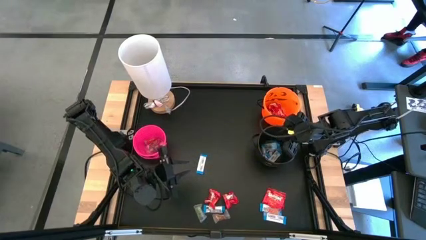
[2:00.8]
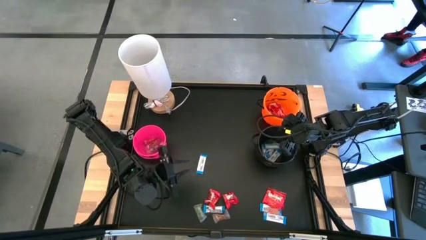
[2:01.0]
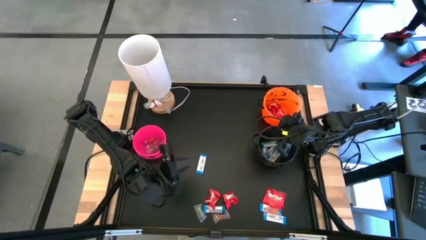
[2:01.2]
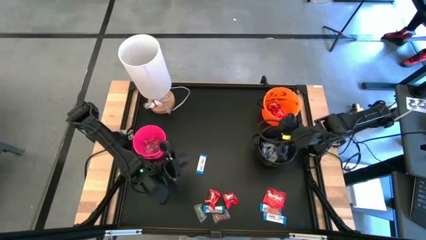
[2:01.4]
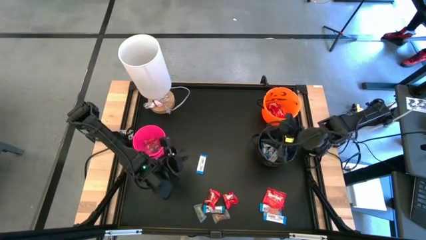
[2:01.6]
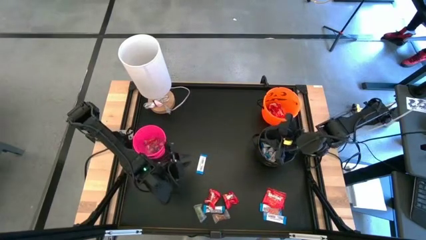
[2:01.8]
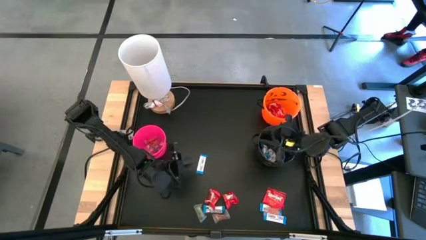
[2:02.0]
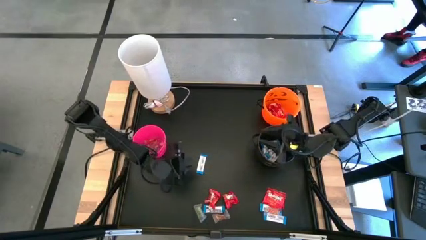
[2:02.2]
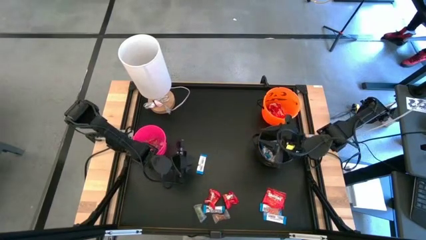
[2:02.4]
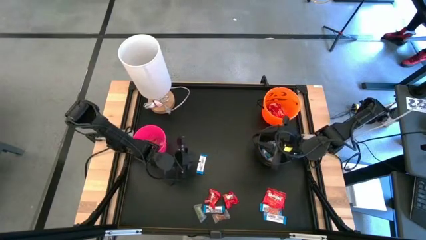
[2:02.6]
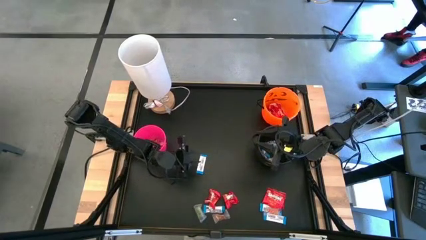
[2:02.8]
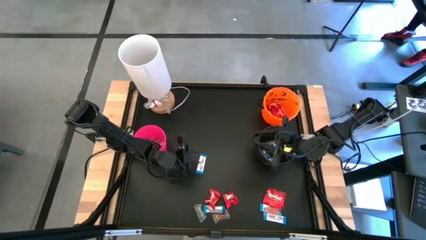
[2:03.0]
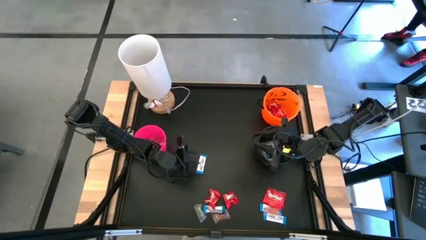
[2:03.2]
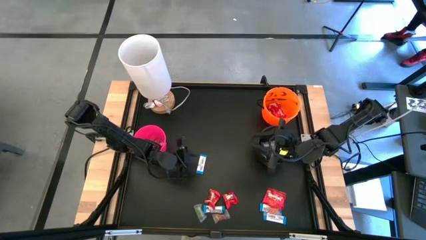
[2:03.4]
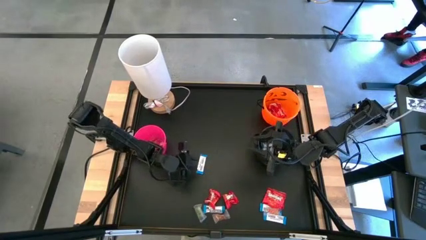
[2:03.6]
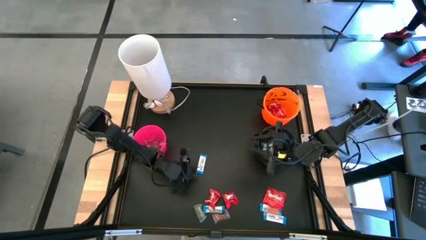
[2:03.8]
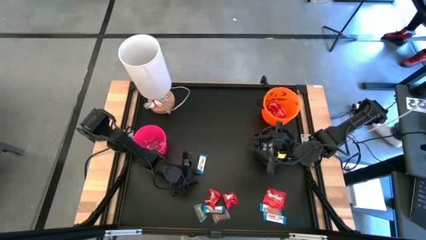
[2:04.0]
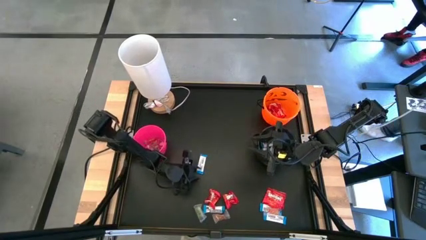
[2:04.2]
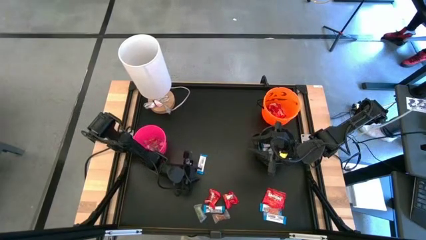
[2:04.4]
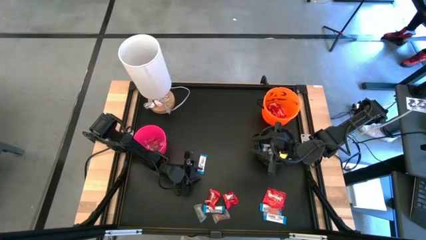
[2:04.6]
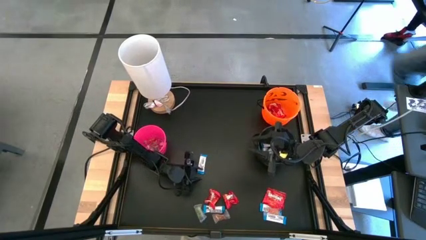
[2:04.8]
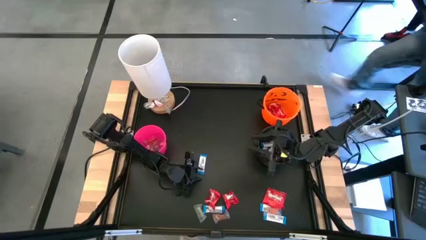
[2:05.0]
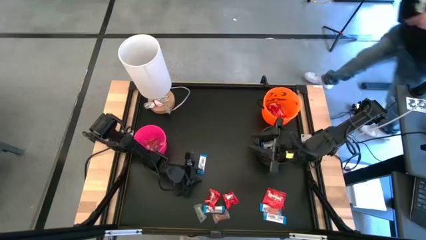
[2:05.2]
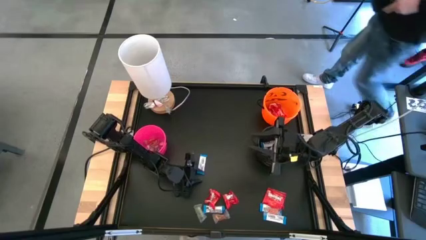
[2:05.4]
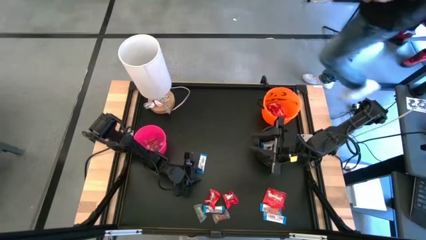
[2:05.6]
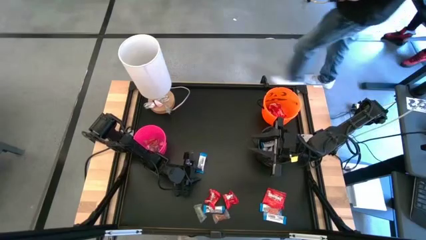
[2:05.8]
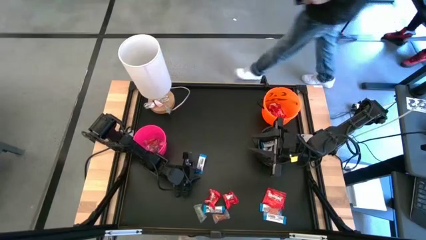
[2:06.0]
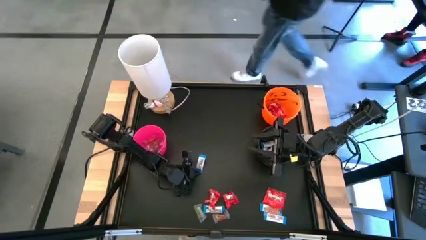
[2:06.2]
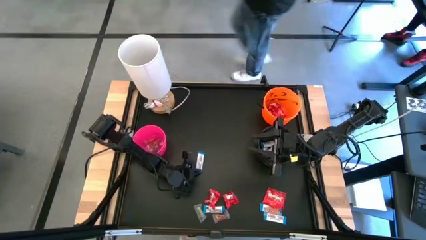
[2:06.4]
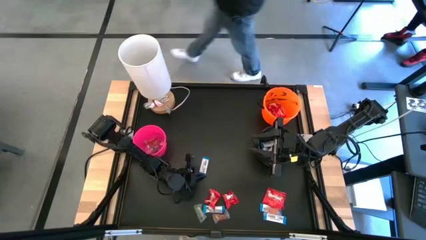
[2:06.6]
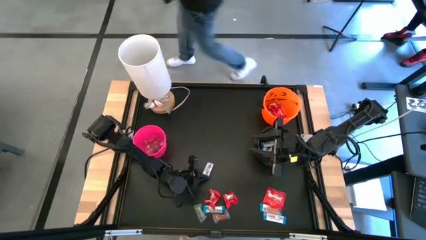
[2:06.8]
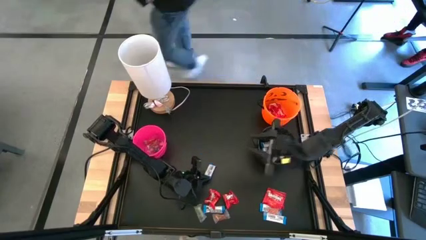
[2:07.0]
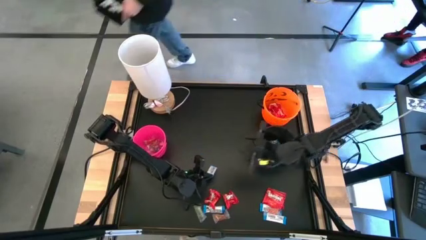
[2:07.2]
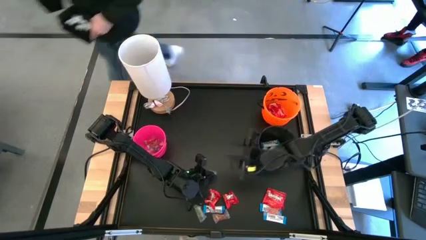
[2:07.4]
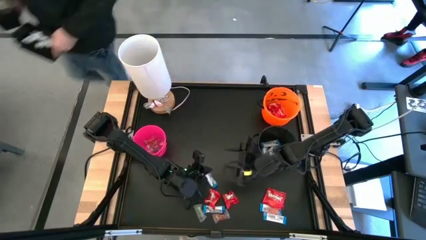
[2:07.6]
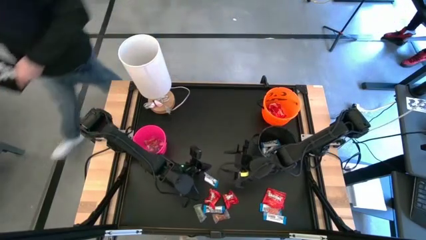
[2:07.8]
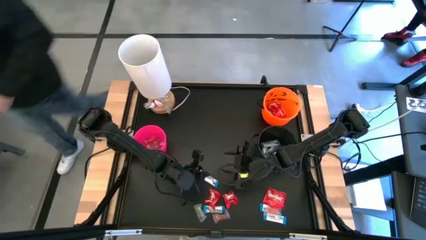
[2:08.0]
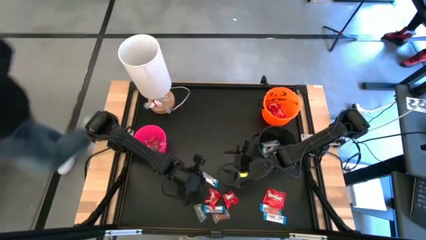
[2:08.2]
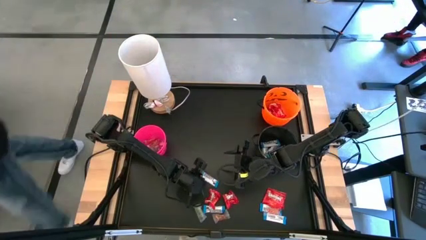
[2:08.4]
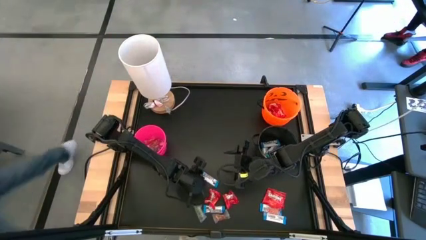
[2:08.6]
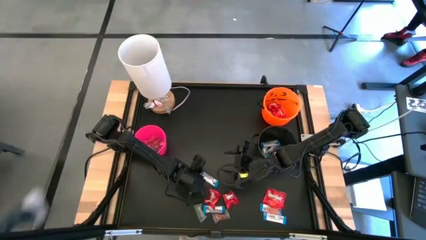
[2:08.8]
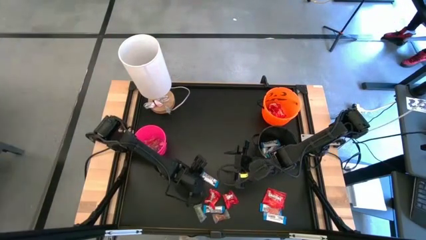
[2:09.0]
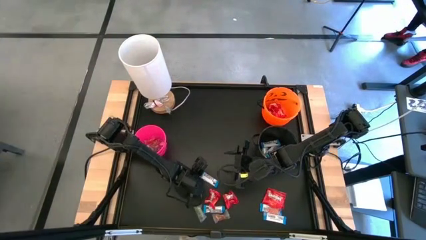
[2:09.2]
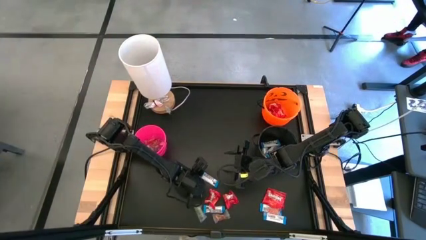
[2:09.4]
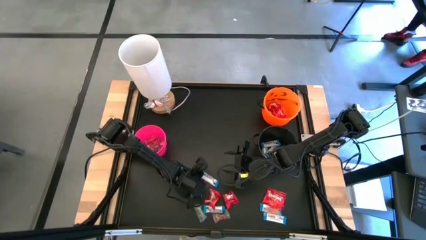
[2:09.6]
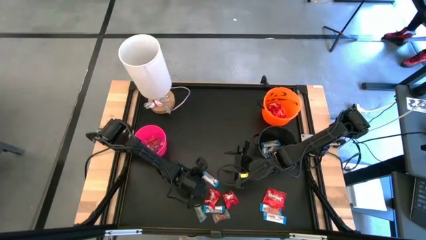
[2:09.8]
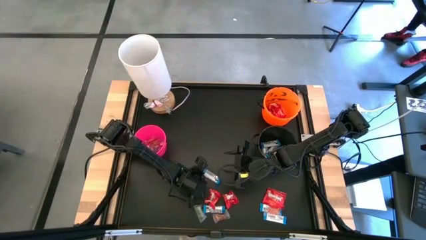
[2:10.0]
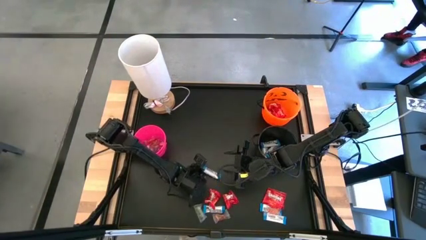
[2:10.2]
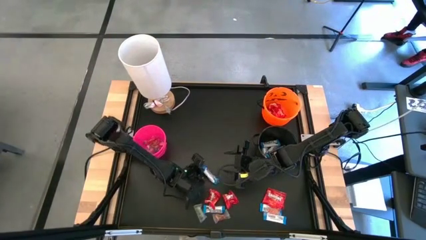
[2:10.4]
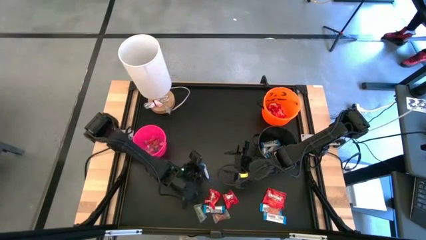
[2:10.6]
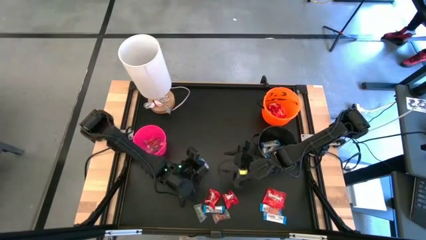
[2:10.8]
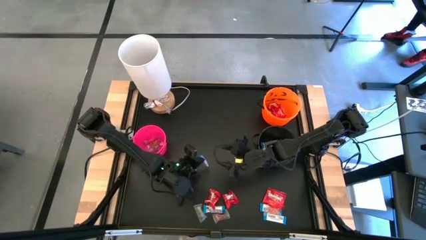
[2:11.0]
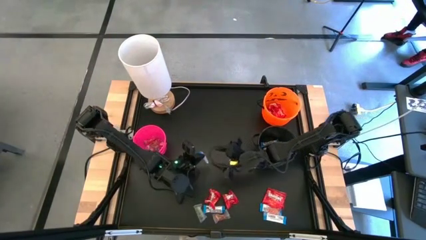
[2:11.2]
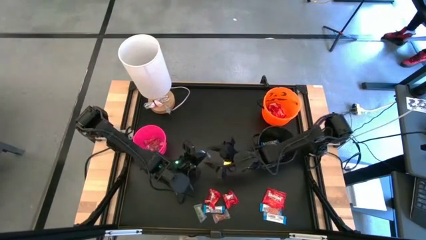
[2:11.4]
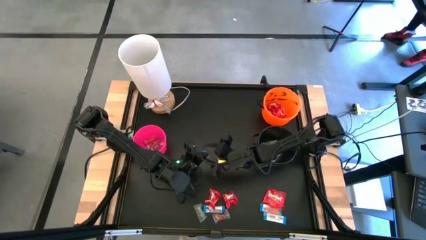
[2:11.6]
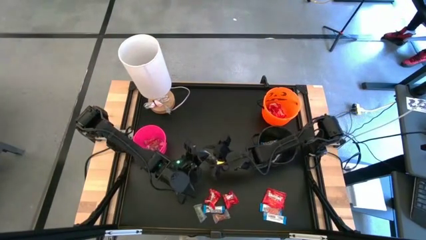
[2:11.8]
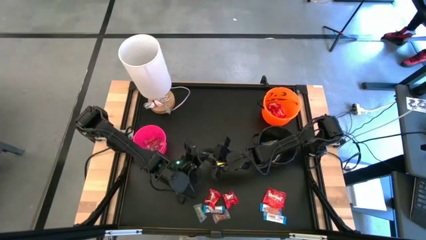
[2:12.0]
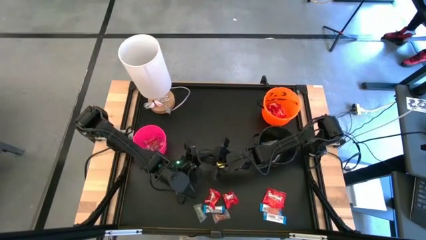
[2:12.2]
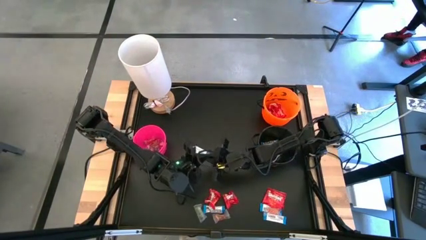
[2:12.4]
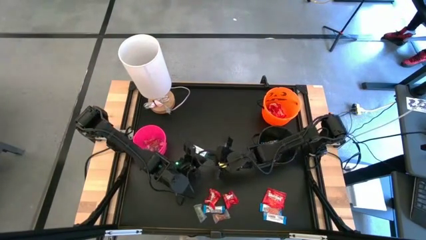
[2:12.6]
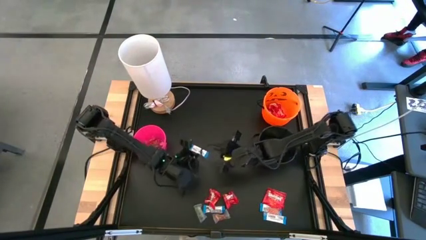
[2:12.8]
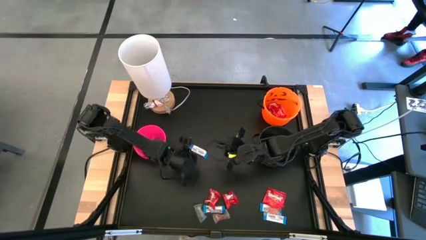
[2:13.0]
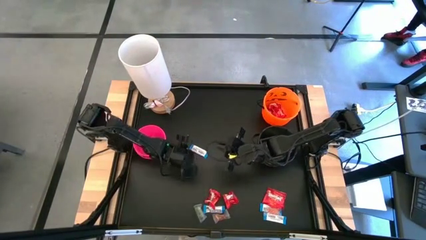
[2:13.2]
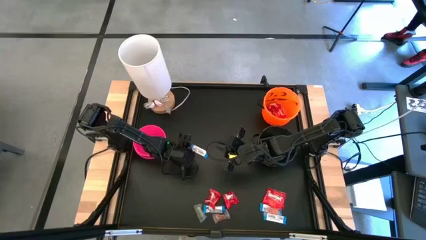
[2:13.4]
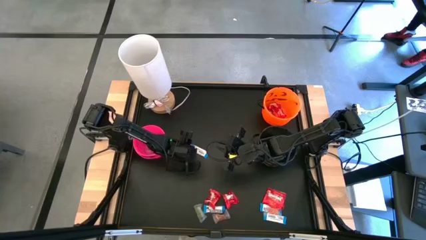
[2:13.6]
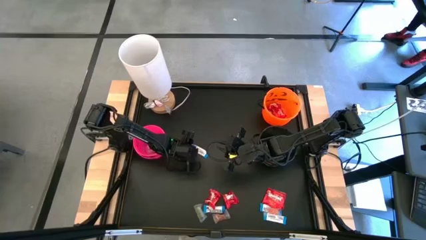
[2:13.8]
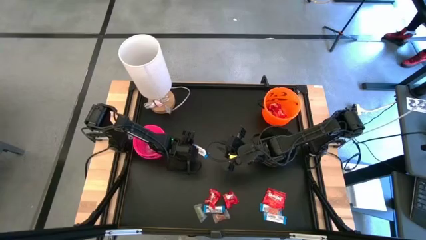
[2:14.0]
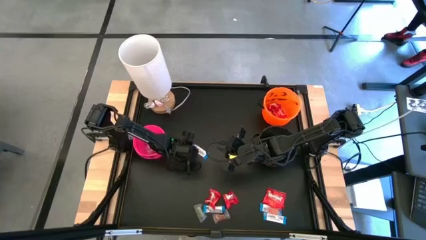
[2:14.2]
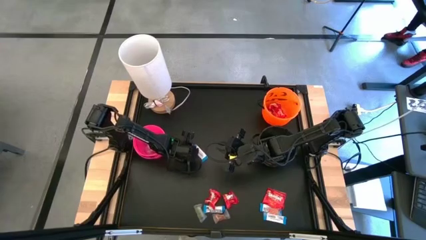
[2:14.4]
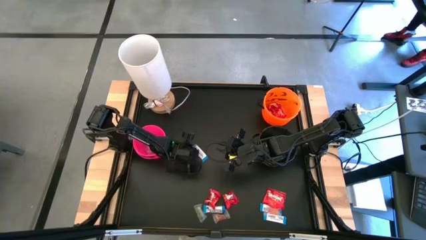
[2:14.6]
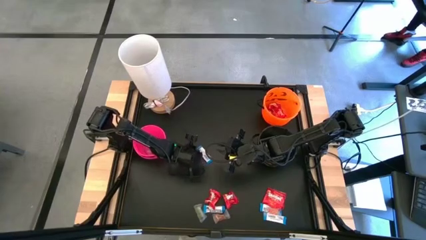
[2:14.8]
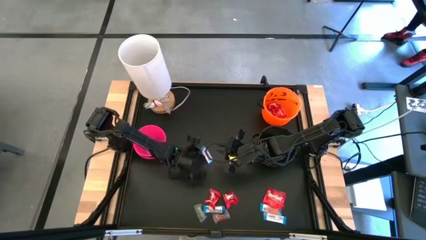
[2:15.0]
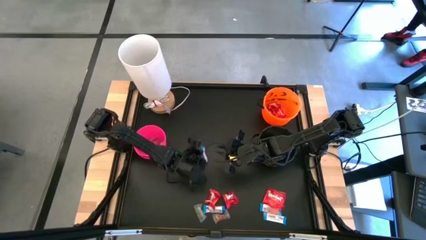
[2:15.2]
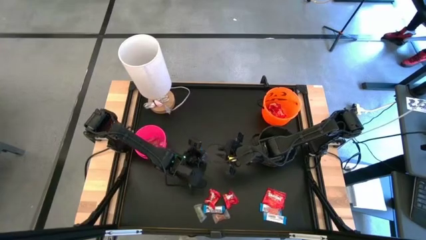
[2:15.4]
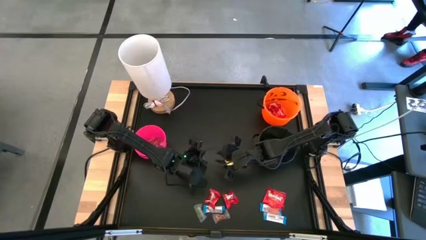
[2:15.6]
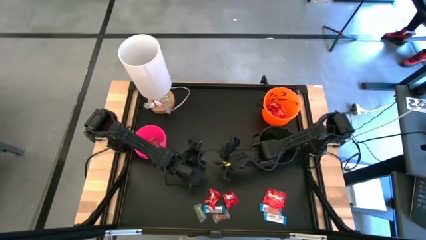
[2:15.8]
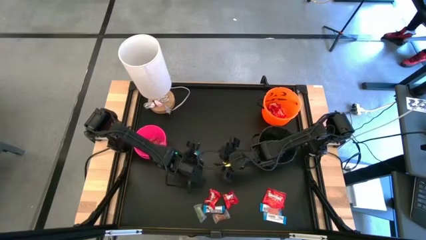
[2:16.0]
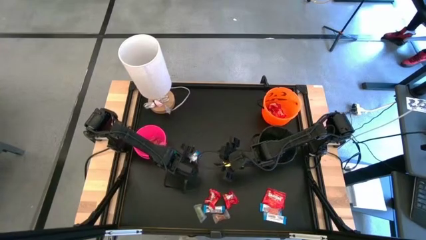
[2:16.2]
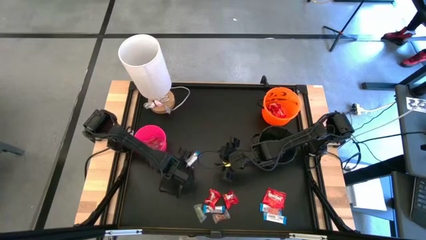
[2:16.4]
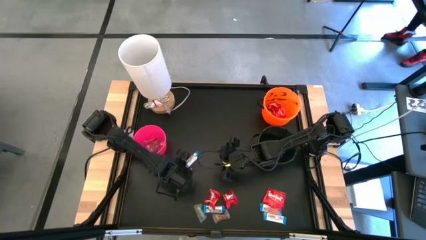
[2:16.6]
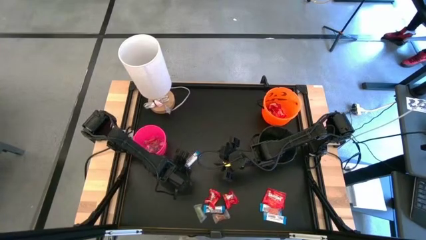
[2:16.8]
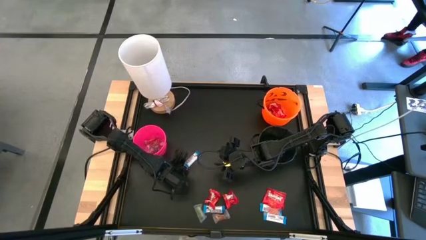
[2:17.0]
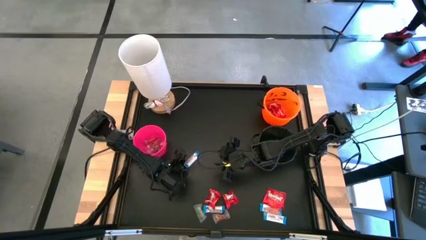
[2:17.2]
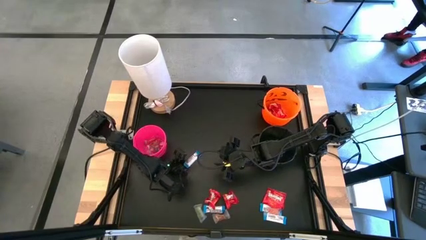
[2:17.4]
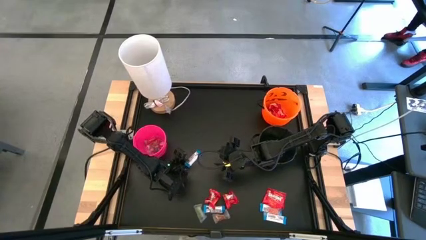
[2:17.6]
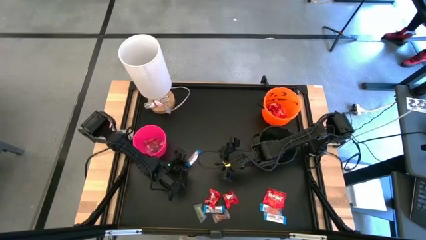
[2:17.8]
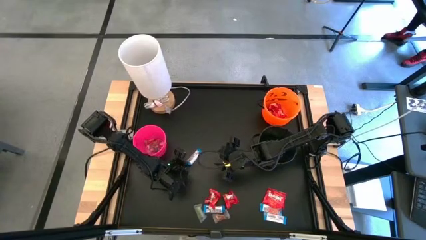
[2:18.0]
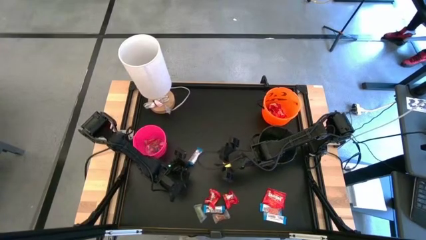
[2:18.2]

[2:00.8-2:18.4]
Task: Sort candy
Put the white chocolate into the black bucket

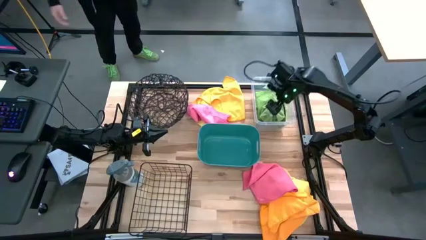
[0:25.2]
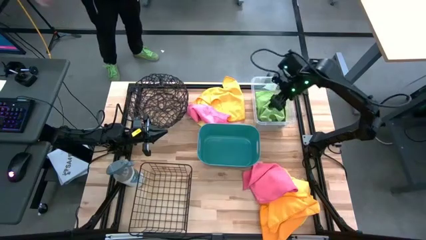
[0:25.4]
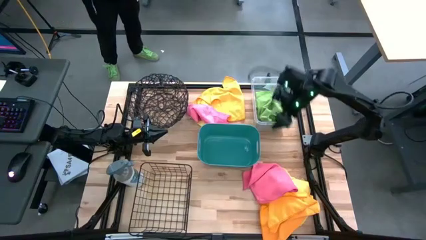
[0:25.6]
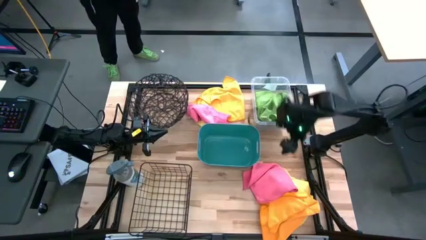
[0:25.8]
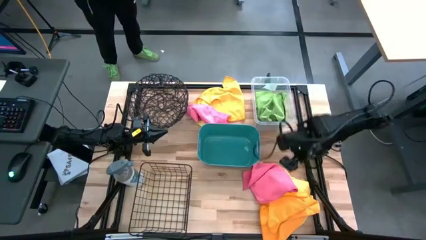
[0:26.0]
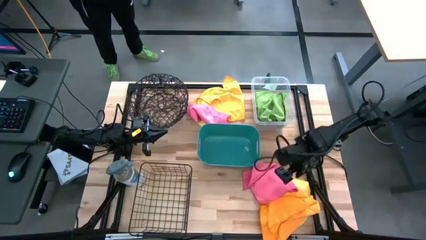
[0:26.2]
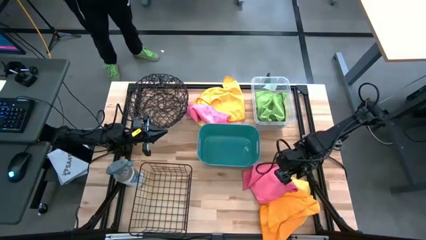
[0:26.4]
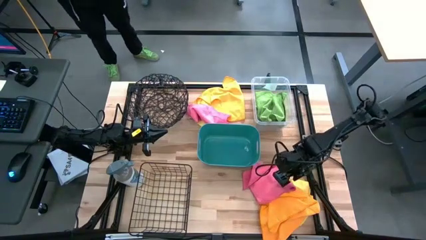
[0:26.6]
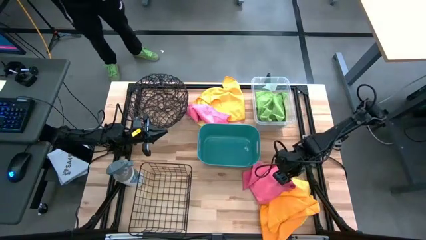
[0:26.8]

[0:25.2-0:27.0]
Task: Sort microfiber towel by color & place in baskets
Put the pink microfiber cloth into the green bin
